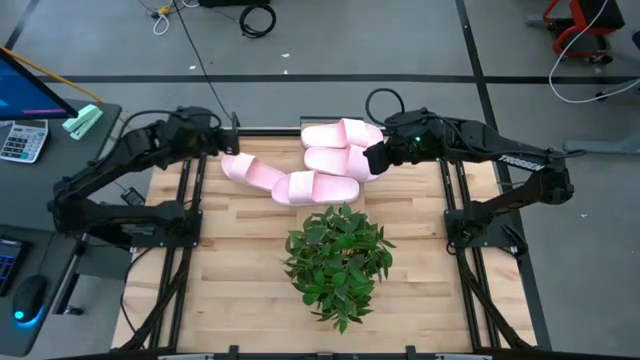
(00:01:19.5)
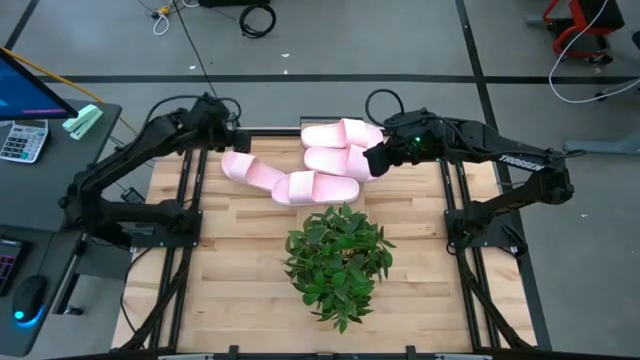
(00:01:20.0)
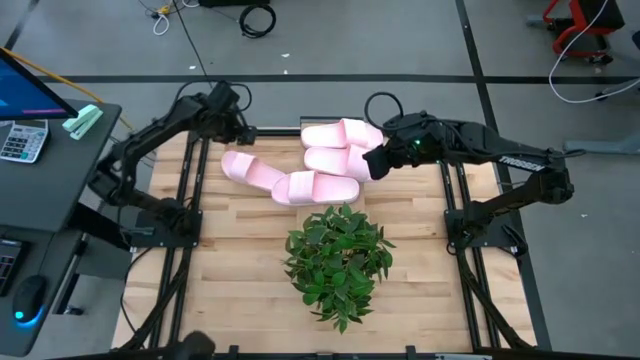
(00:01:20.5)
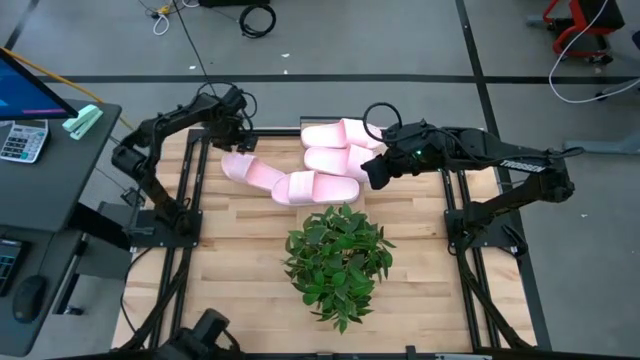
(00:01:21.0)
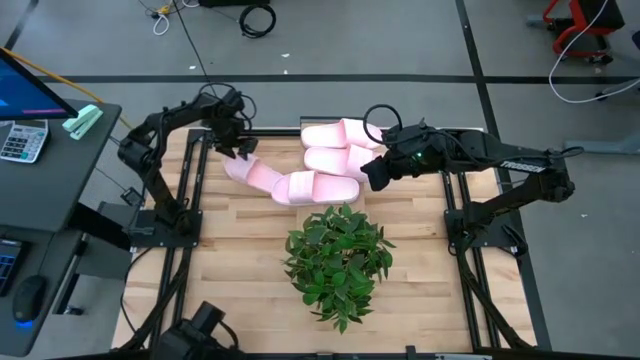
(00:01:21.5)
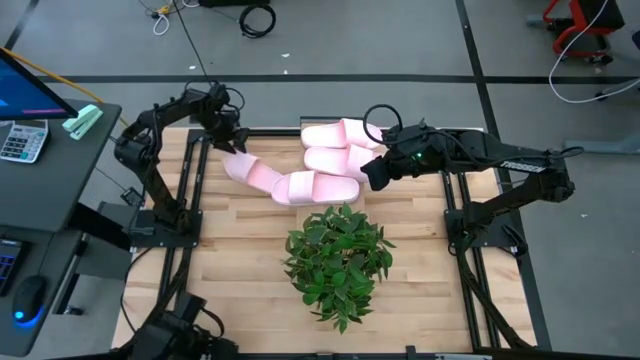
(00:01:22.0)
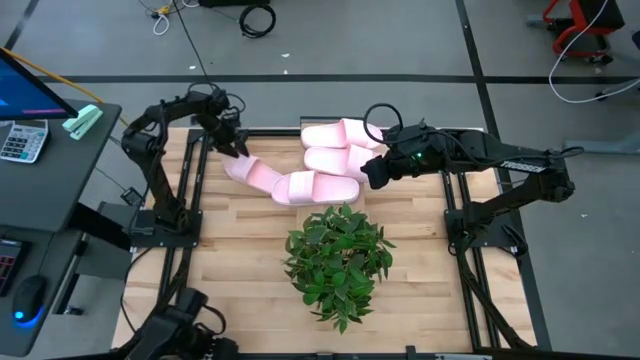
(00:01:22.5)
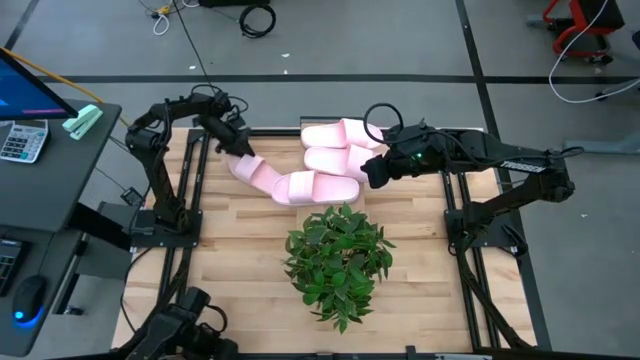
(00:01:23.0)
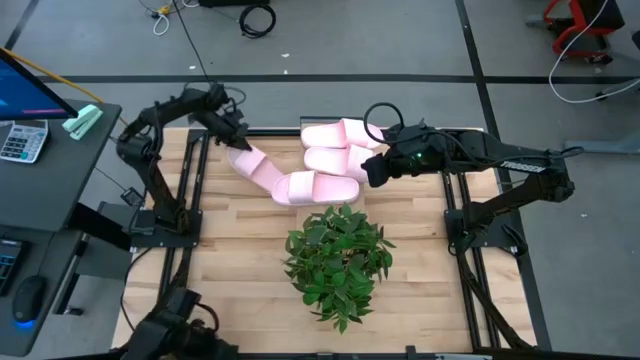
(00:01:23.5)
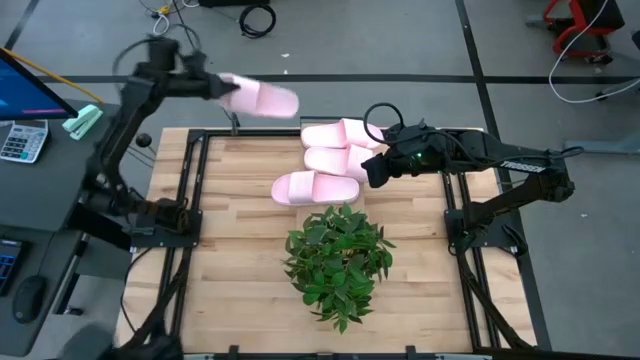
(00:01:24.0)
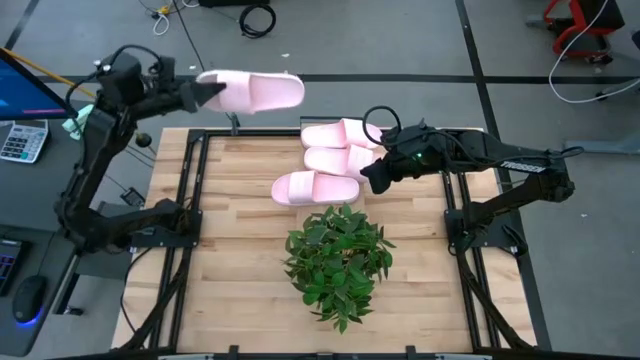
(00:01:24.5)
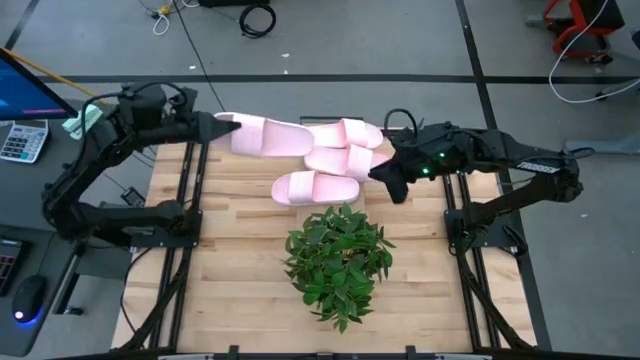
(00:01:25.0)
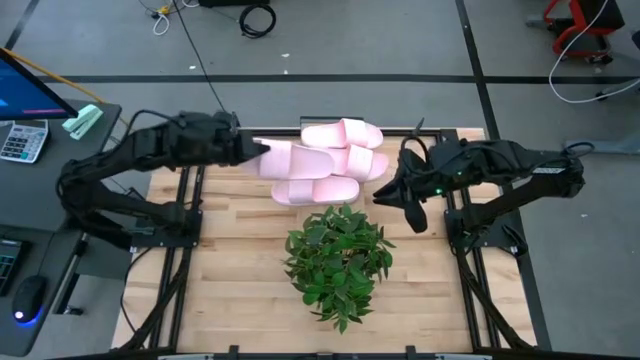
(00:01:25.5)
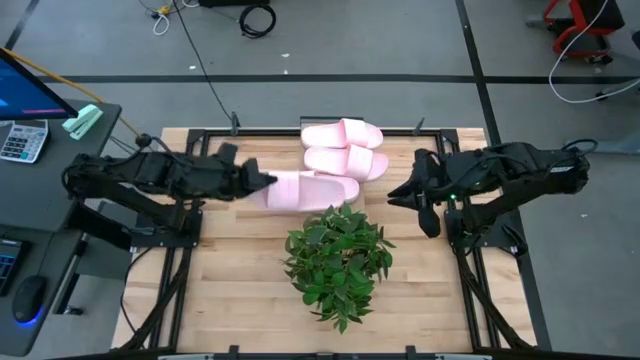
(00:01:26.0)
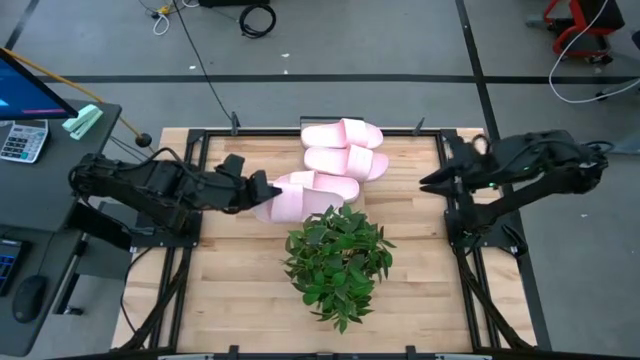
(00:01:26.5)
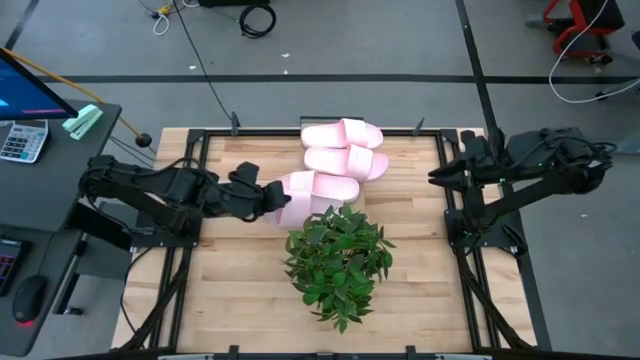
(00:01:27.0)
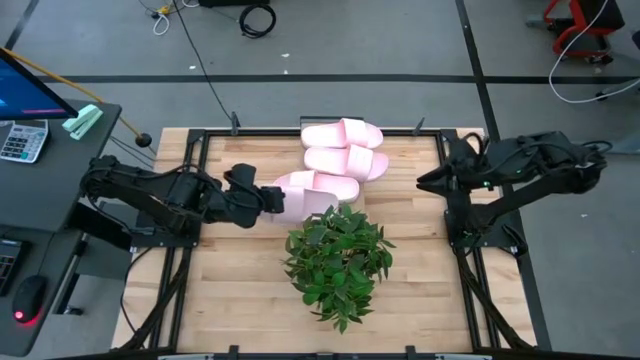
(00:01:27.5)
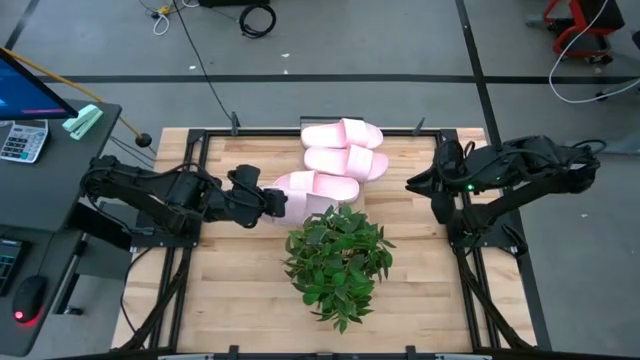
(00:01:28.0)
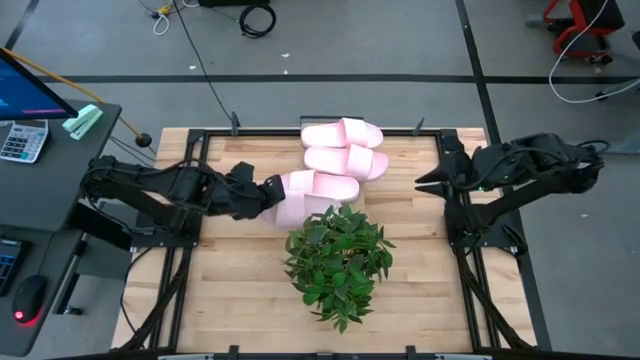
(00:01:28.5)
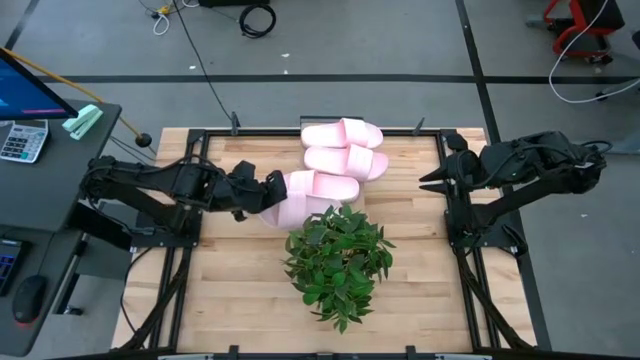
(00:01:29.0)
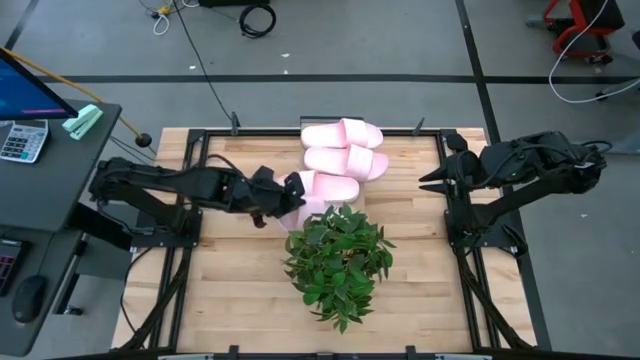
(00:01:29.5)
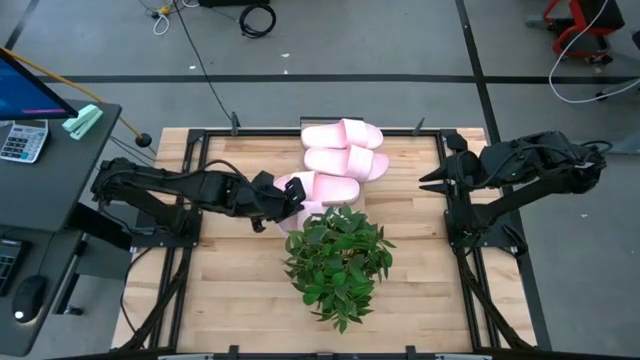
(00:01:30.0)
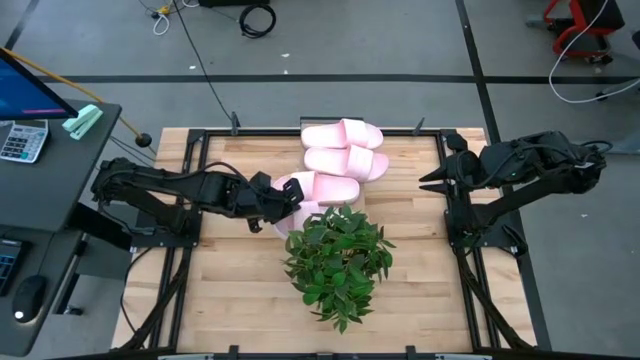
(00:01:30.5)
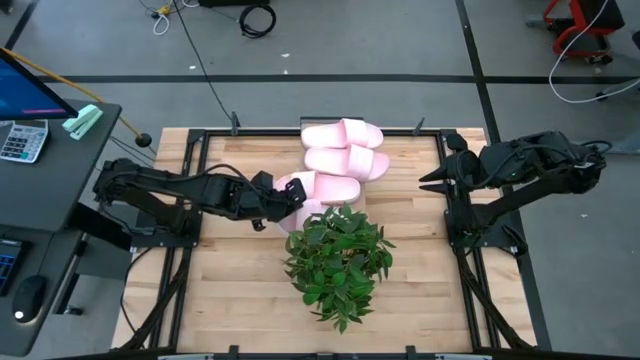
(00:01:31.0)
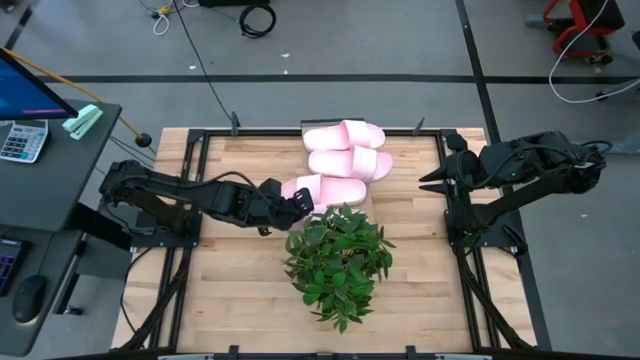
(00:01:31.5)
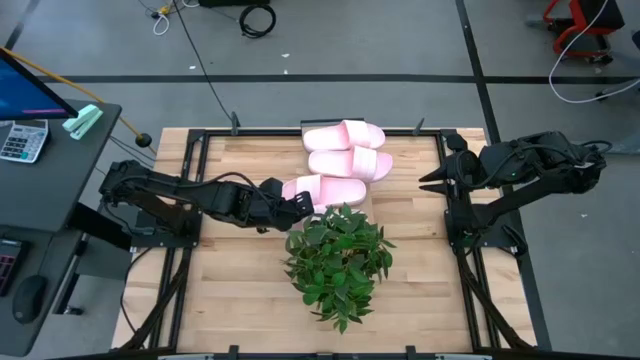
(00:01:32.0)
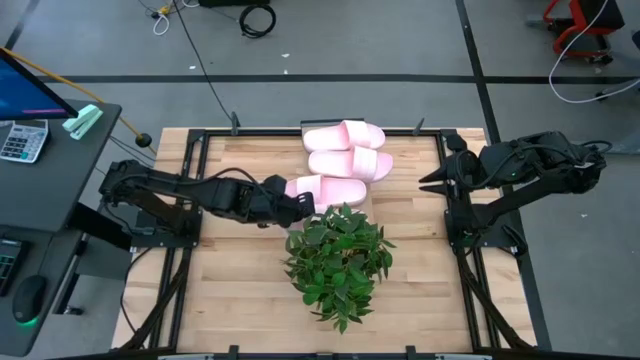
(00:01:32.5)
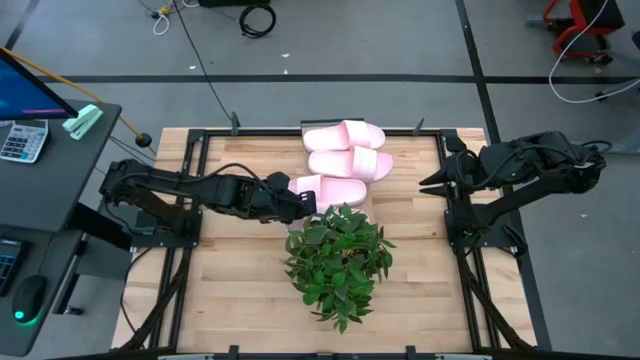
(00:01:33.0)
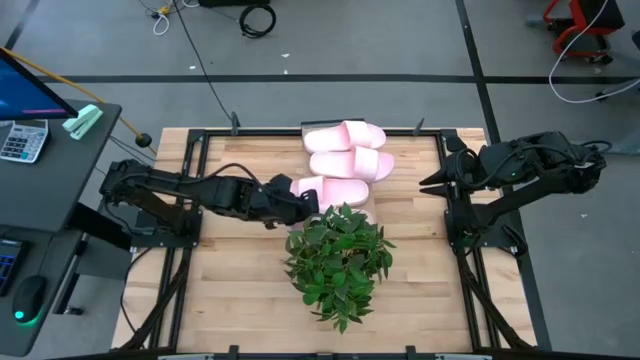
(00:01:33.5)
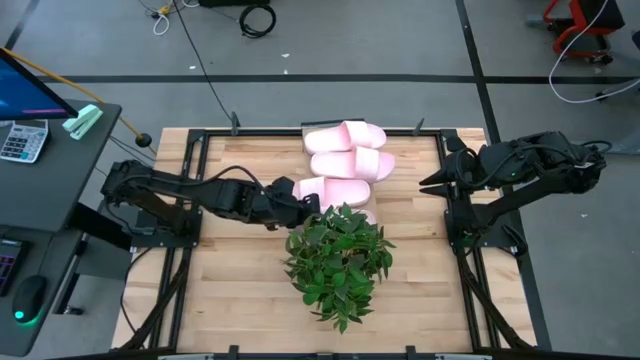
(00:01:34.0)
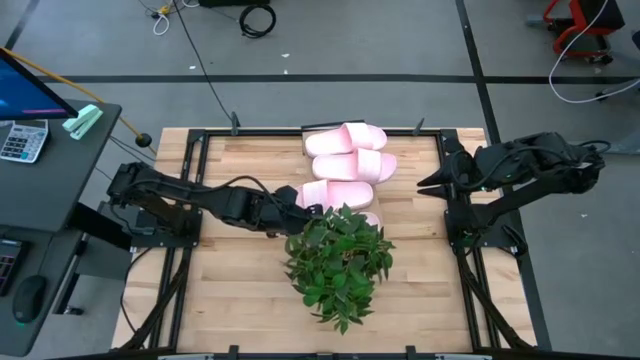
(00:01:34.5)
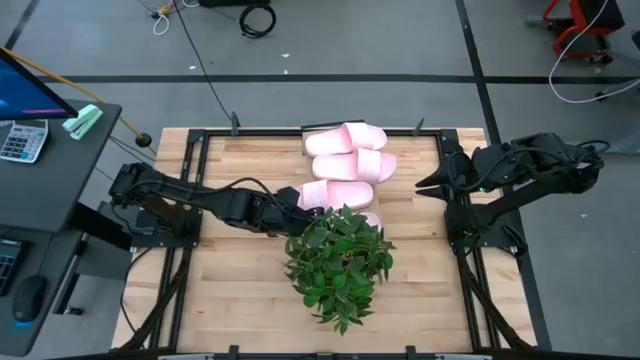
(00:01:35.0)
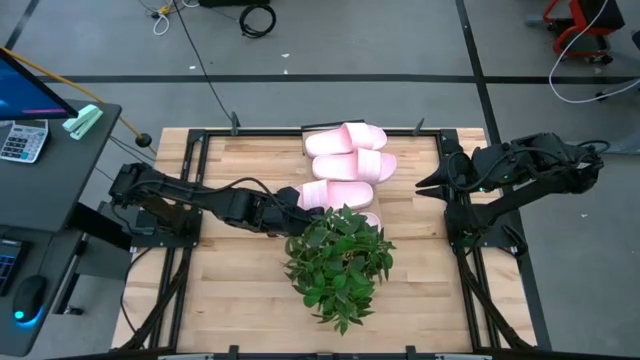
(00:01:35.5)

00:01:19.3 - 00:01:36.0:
Task: Pick and place slides into the shelf
Put the pink slide on the shelf
